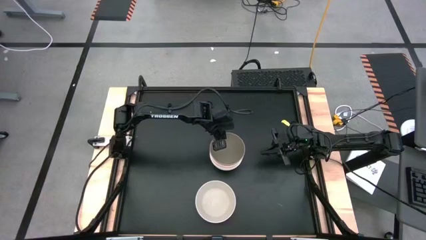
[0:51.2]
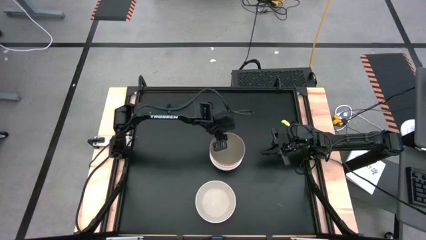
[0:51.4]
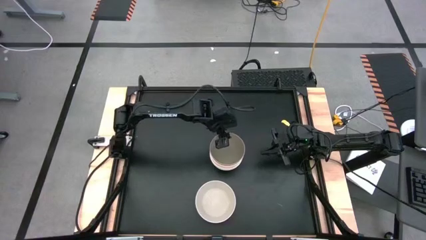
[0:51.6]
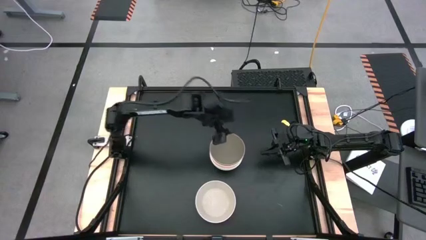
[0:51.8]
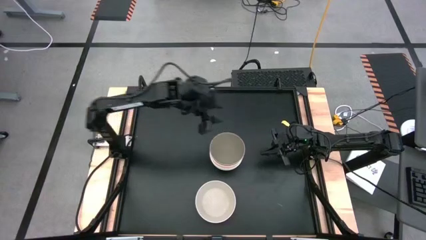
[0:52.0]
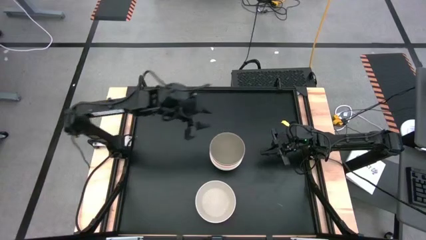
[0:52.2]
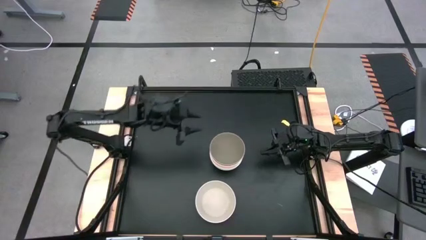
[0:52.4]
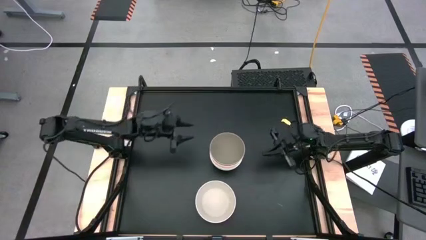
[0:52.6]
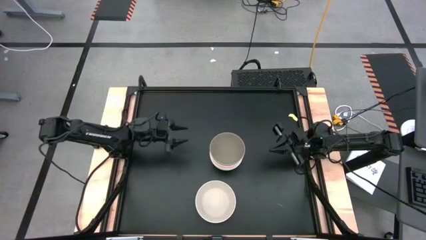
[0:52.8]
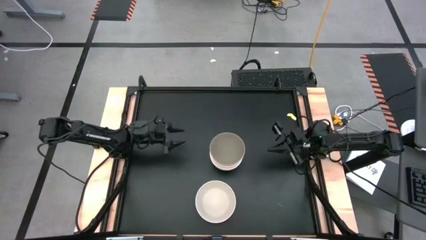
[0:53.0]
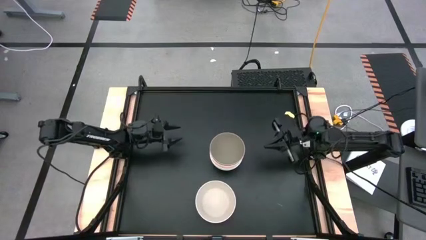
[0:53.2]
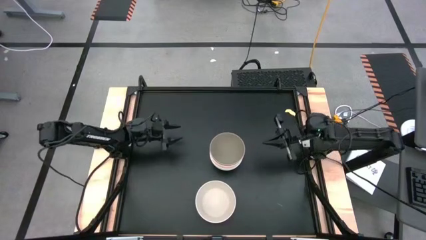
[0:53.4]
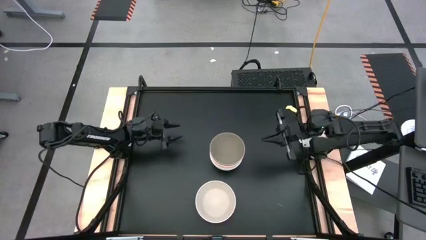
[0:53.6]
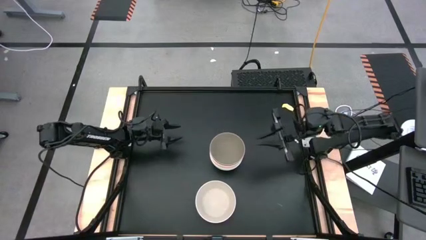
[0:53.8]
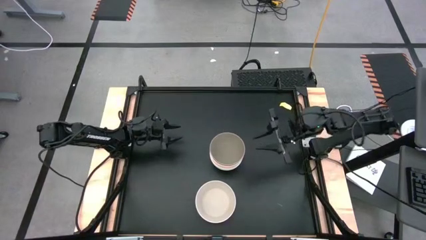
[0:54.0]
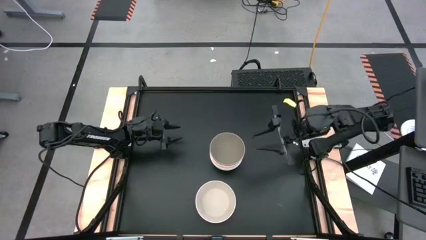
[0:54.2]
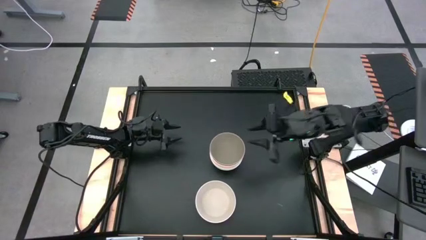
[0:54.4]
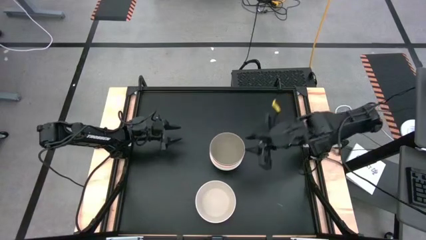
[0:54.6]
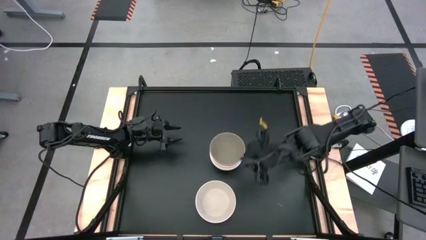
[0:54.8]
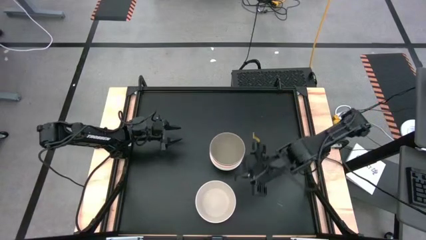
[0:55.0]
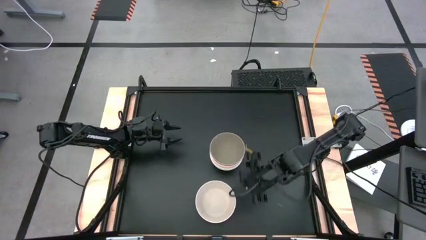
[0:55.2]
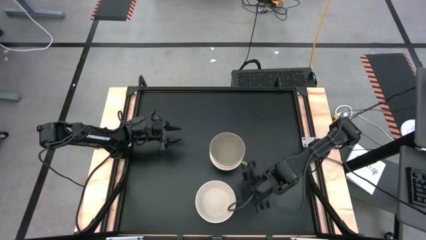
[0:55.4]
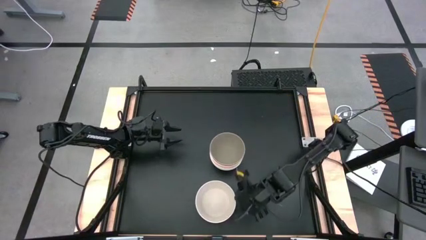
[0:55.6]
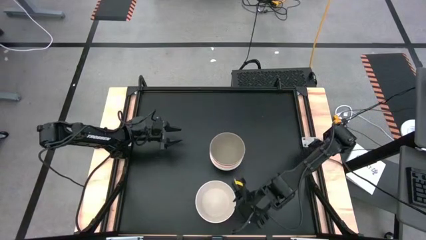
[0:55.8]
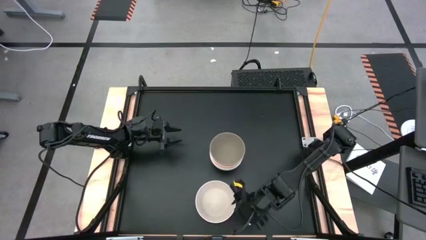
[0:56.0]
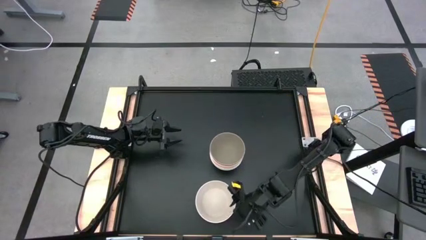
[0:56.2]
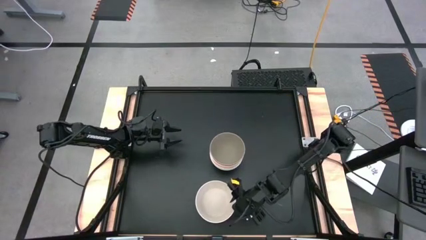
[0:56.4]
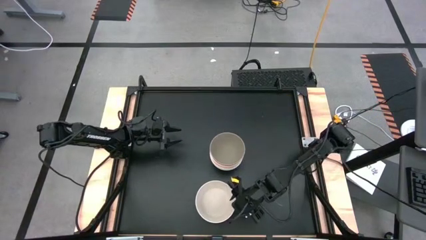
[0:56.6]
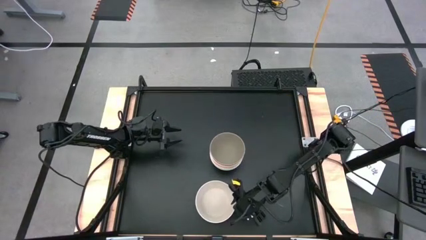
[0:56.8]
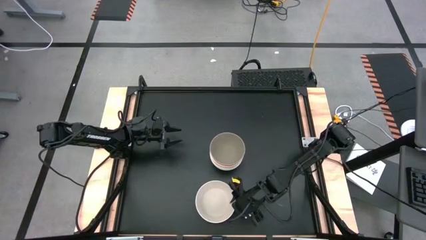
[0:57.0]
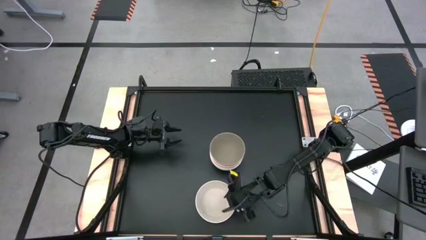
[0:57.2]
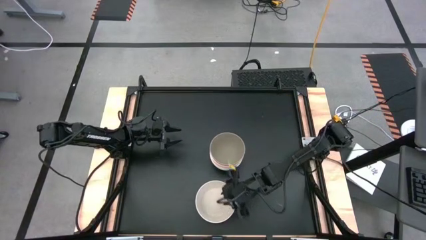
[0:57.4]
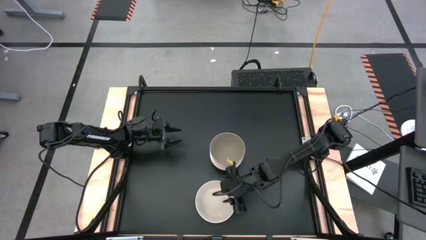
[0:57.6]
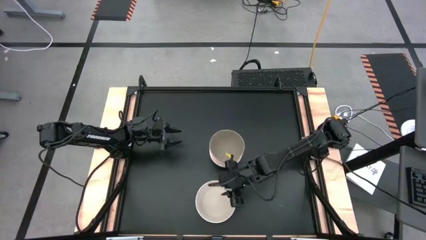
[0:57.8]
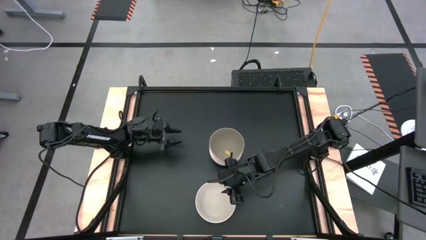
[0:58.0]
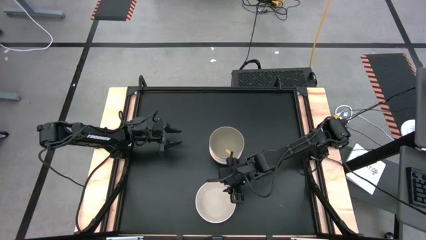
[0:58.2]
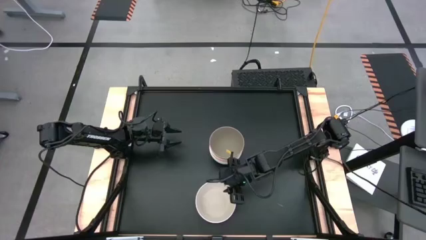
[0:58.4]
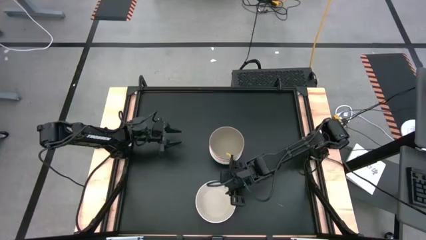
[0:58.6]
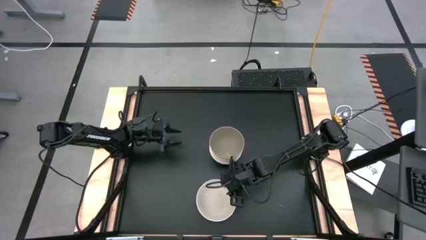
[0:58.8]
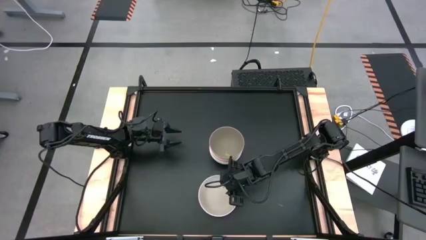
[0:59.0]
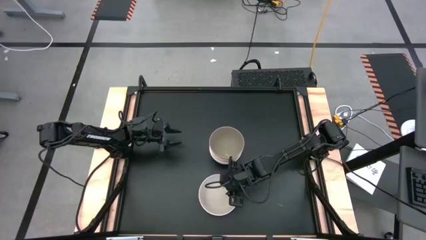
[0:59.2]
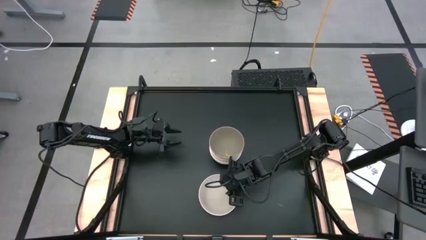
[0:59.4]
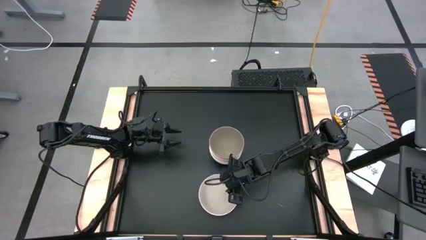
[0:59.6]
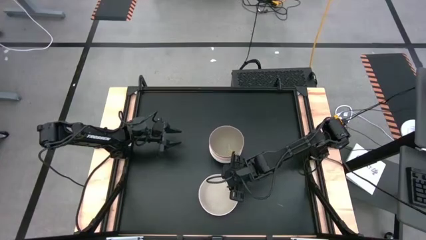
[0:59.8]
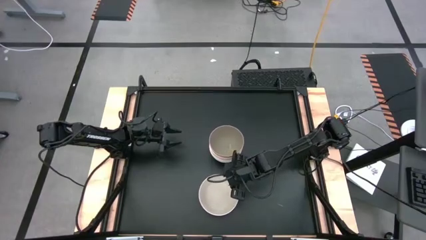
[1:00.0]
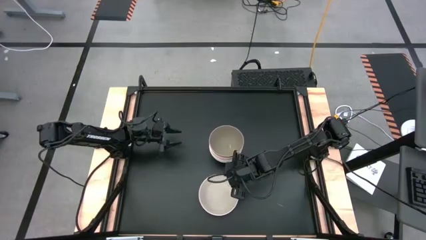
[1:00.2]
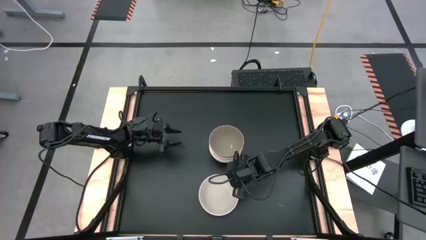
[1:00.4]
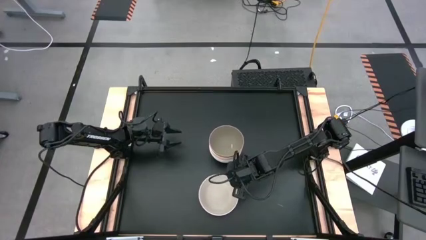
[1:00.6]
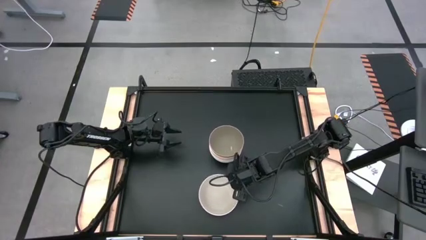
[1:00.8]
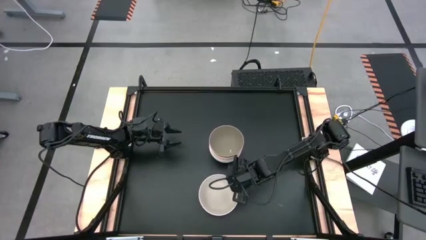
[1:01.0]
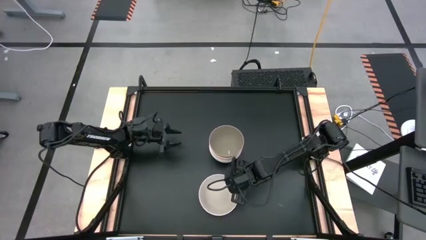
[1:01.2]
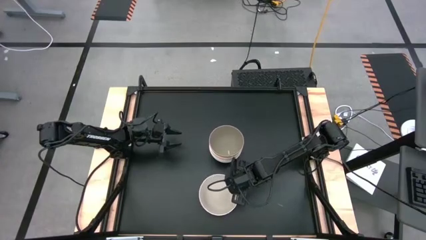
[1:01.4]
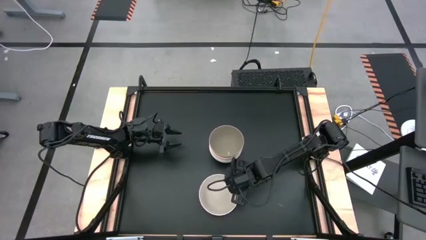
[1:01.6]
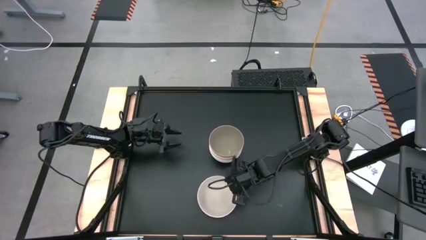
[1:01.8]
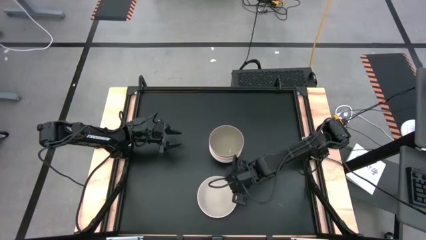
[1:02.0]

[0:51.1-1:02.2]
Task: Nest bowls inside each other
Stack the light brown bowl on the gray bowl

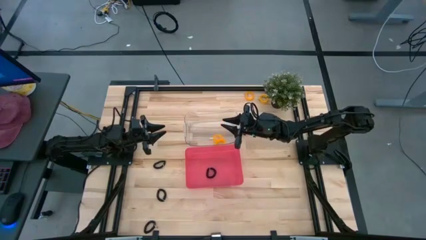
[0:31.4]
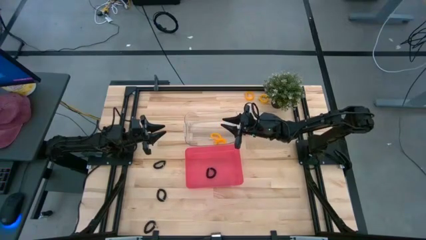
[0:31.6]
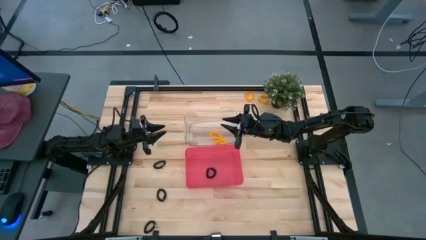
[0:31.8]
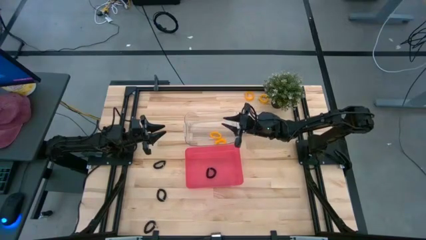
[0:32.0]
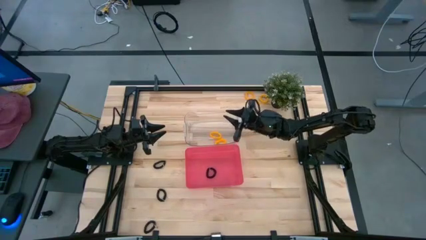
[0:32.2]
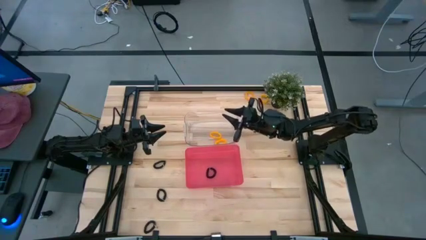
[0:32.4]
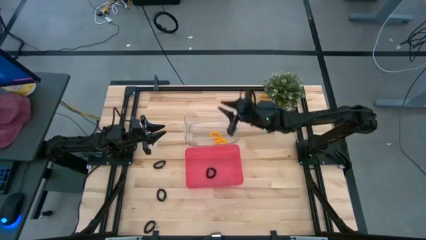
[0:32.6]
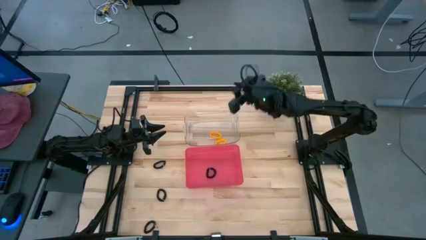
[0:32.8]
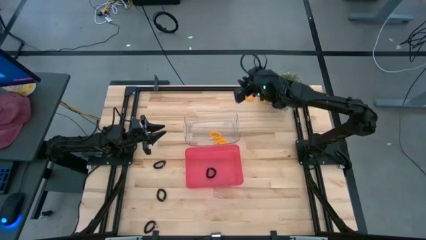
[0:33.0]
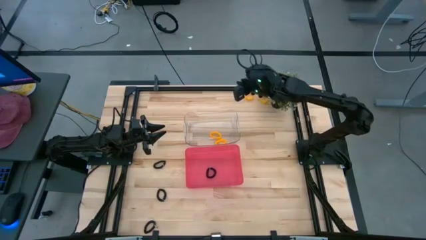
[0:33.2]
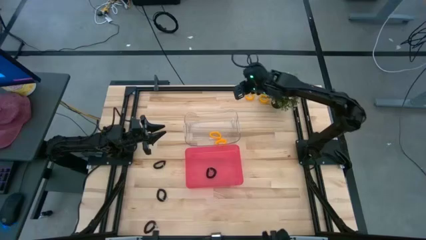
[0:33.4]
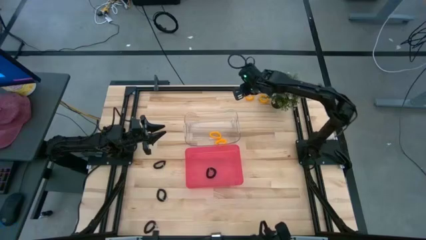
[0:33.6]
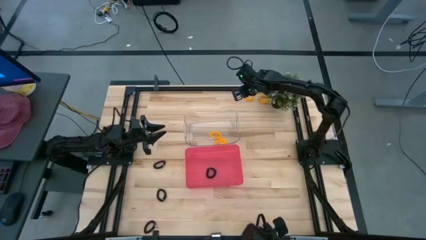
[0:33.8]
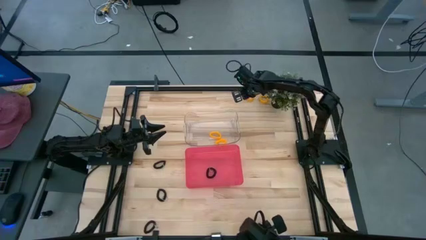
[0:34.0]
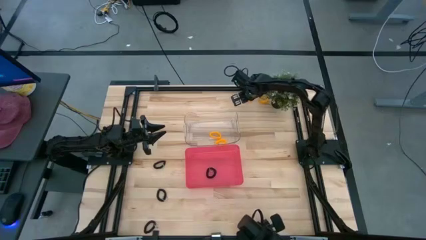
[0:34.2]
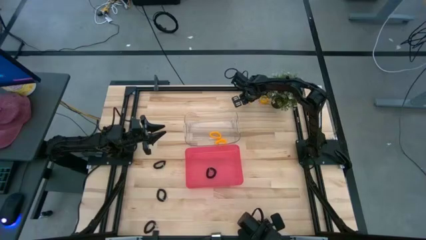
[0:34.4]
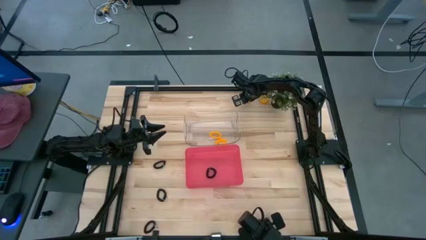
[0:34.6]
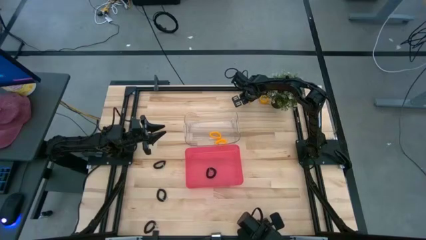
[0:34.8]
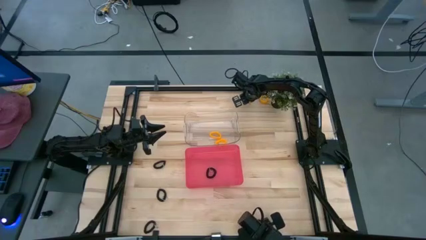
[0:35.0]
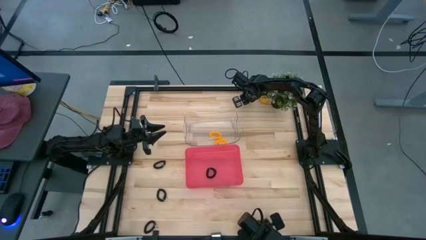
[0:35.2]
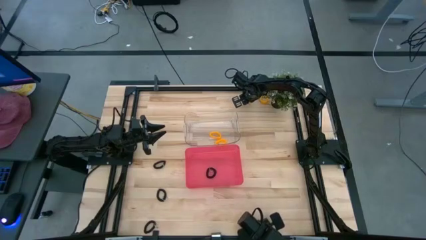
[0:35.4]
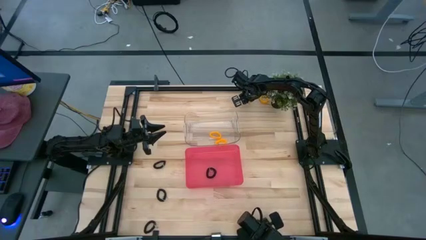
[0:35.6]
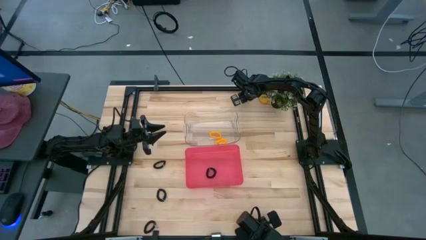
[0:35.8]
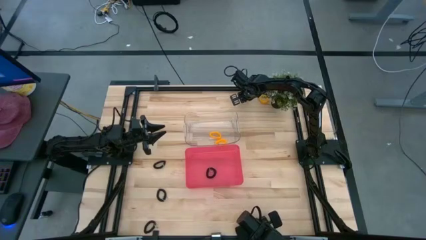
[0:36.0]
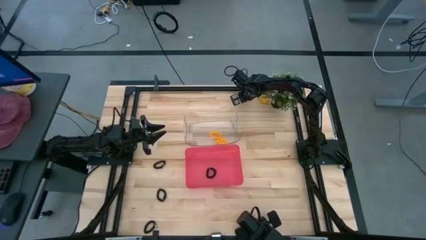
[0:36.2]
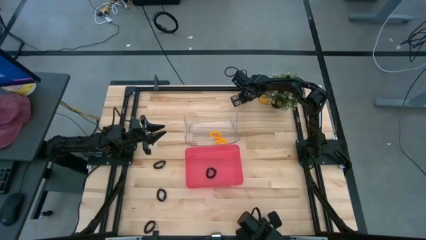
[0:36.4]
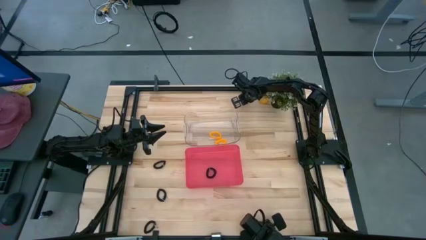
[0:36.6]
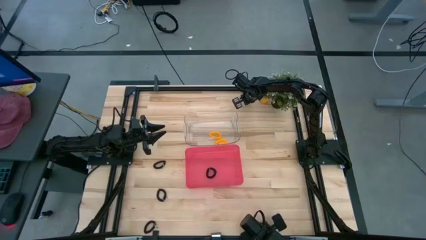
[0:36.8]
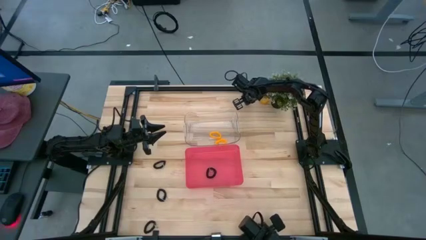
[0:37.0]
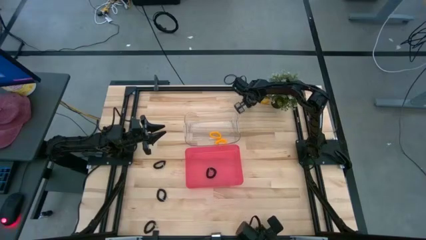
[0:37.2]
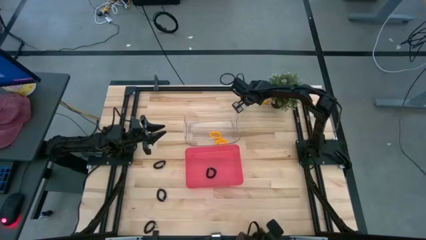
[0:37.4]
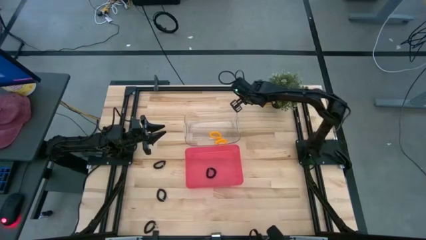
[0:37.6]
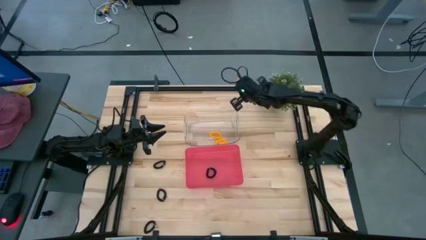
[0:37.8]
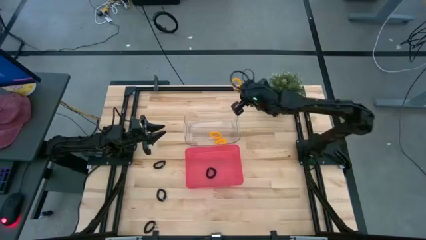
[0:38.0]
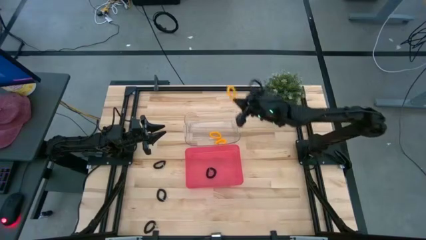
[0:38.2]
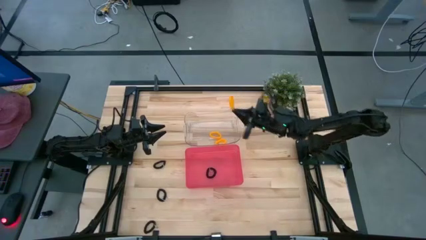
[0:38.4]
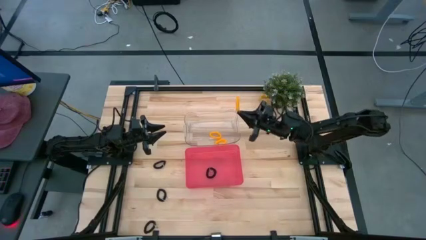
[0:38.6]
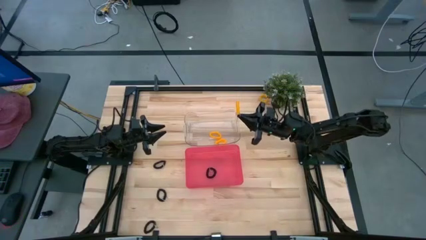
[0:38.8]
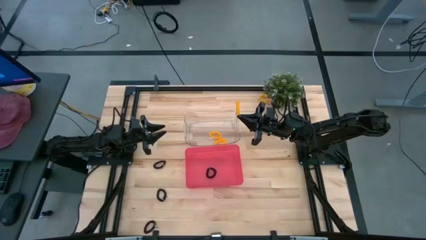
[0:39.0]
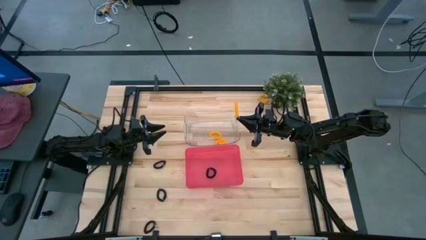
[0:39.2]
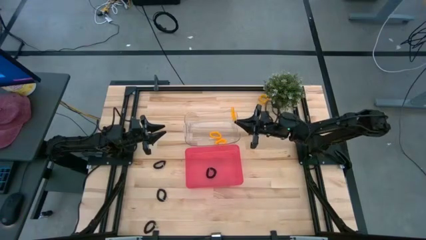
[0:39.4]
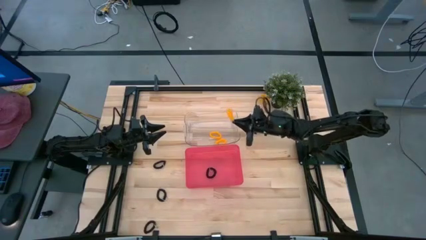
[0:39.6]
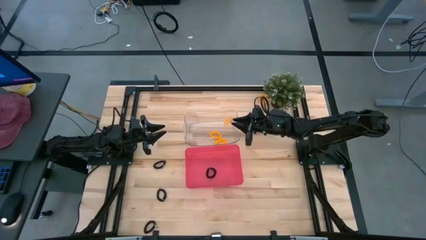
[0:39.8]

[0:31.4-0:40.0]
Task: Sort spring keychains
Put the yellow spring keychain into the transparent bin
